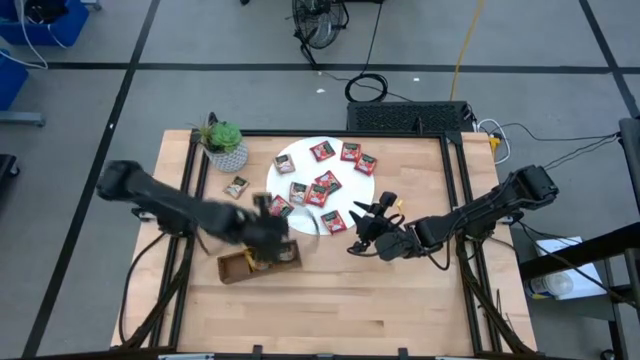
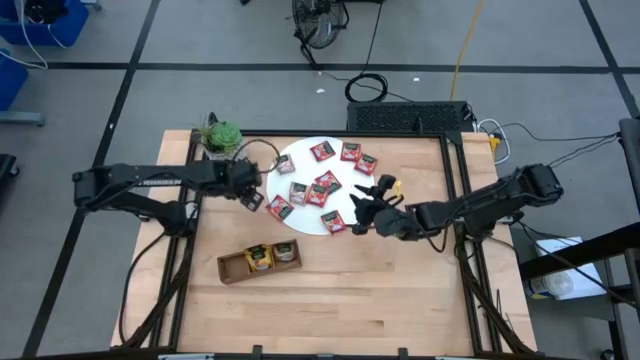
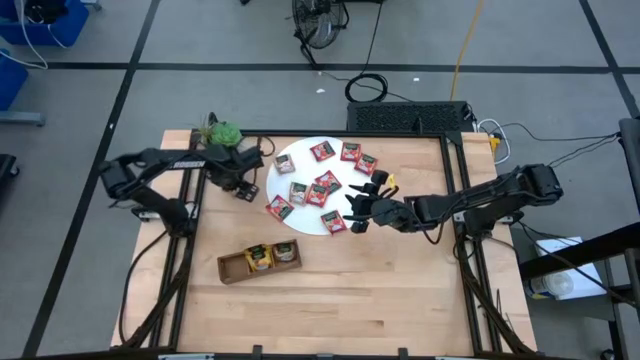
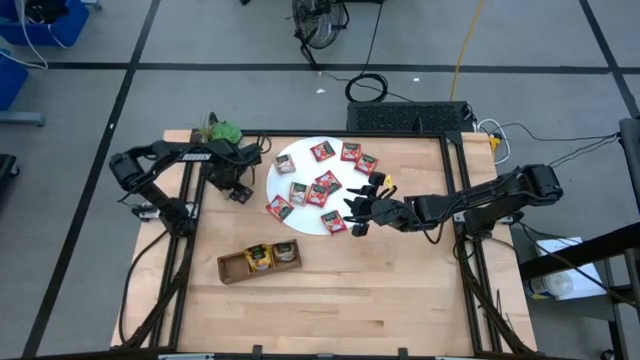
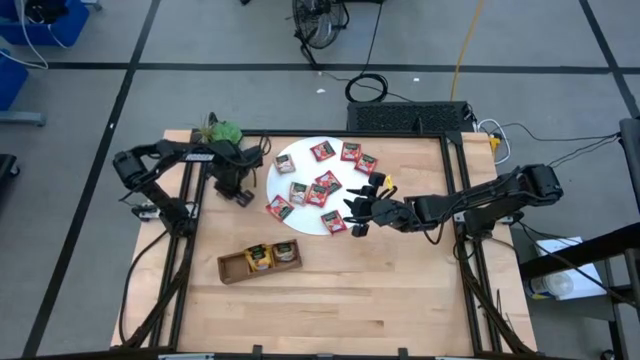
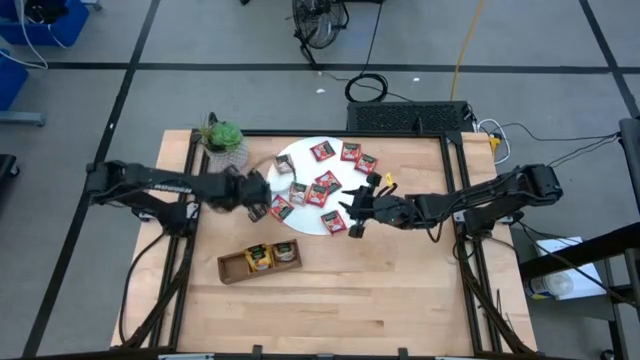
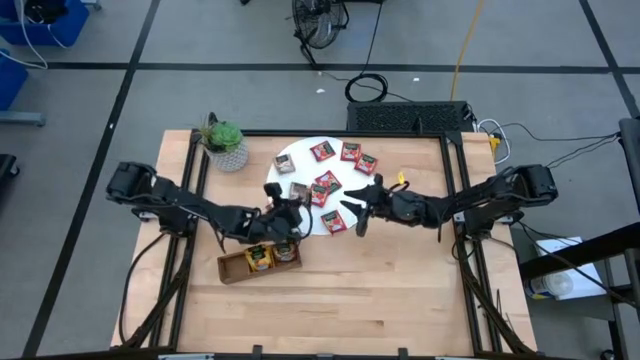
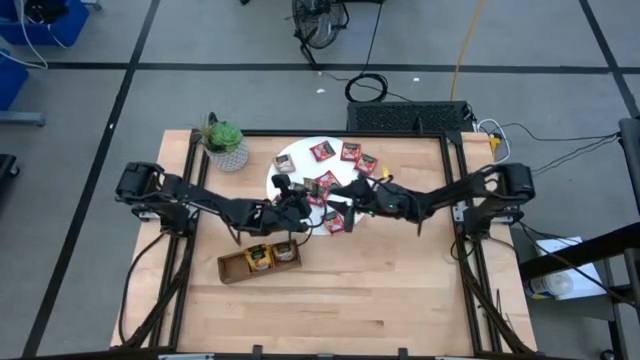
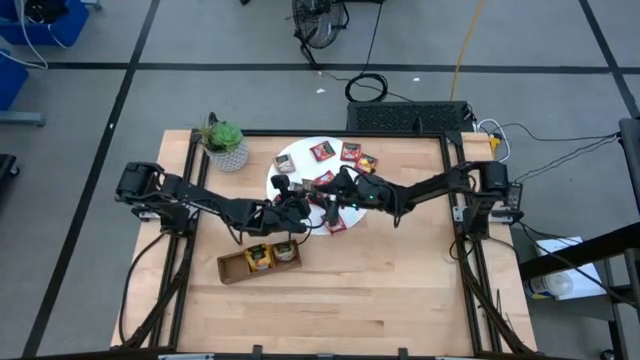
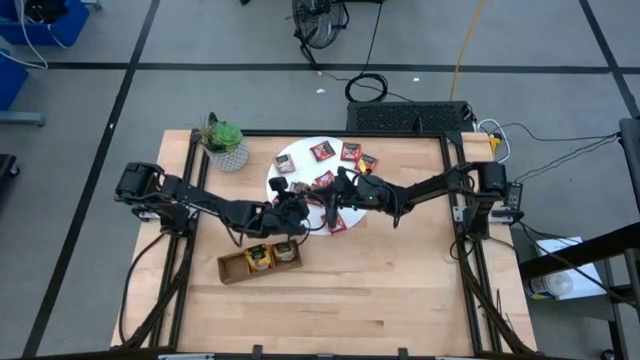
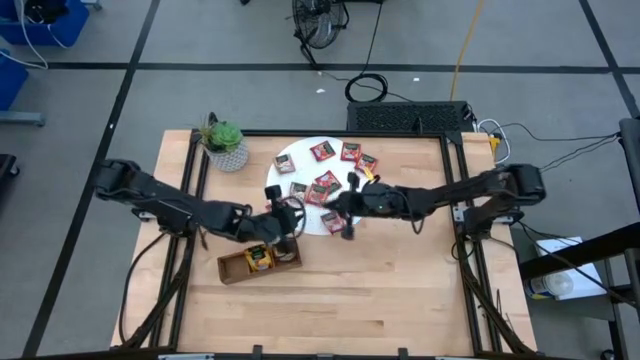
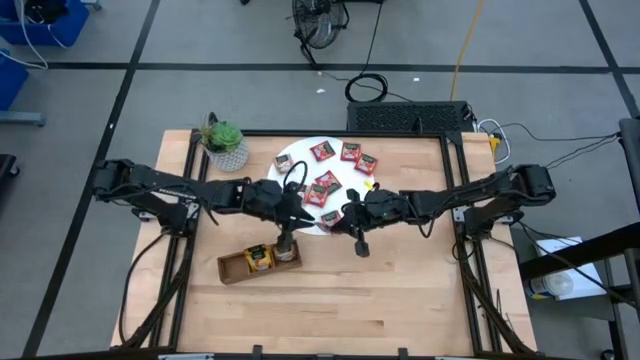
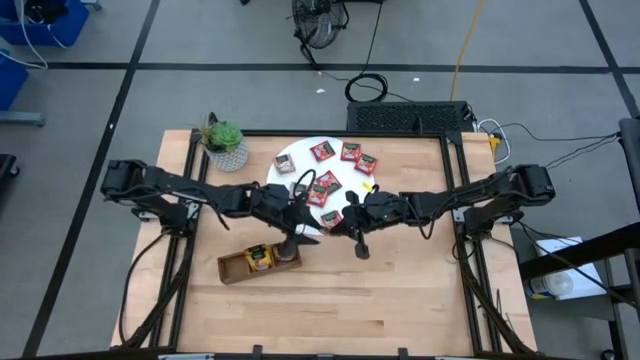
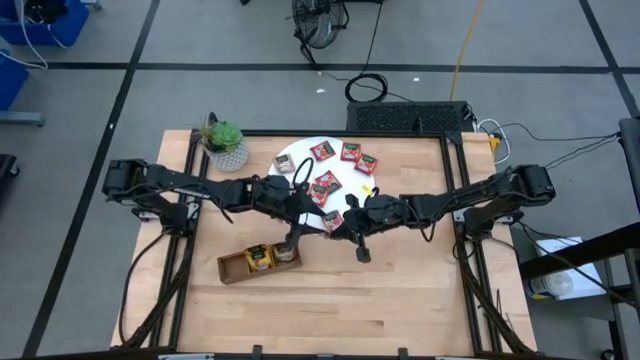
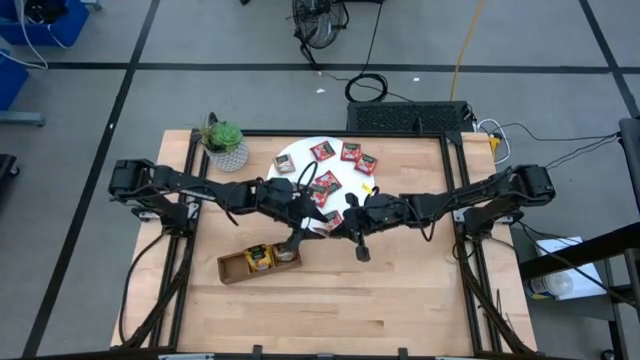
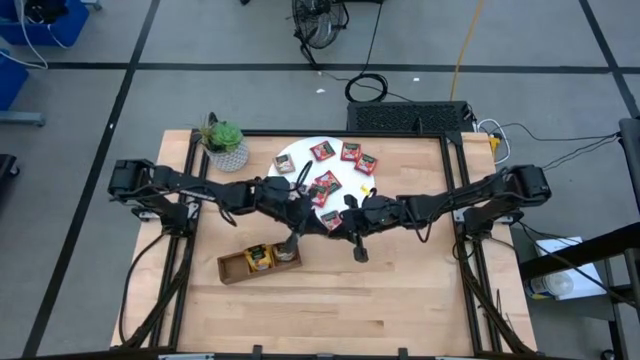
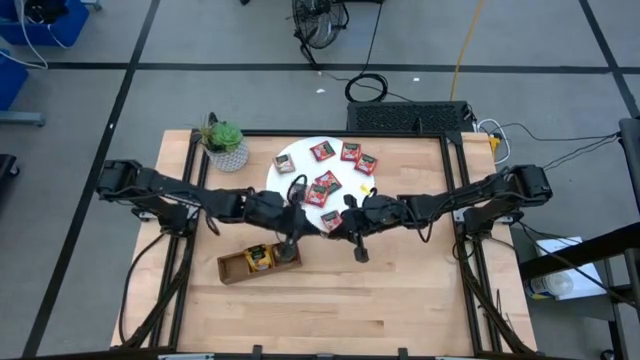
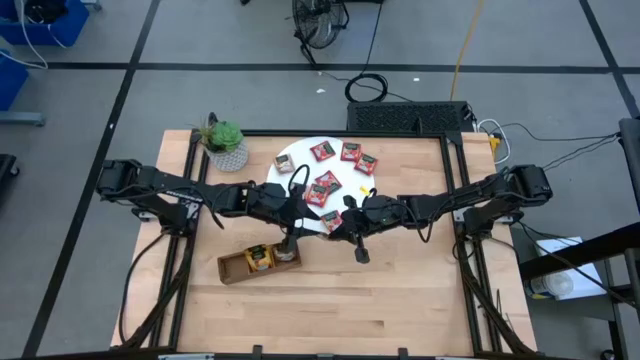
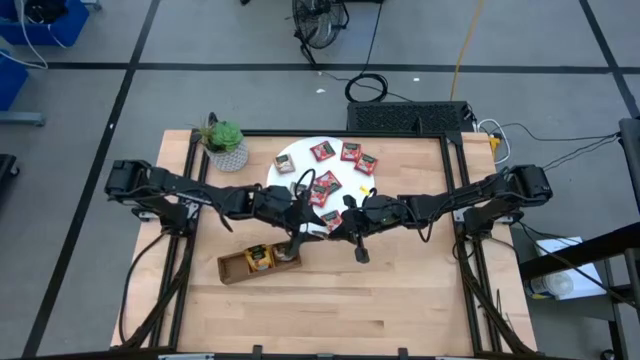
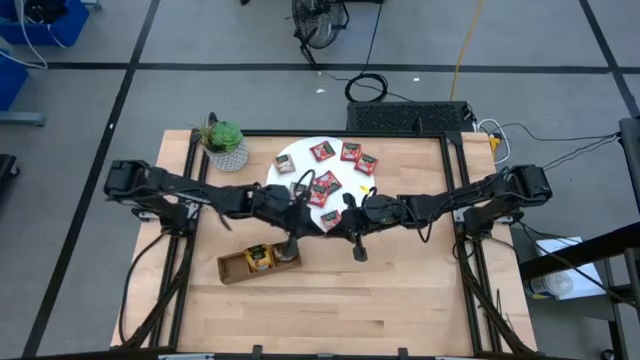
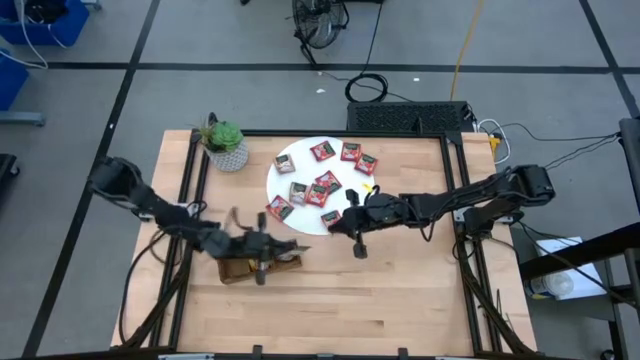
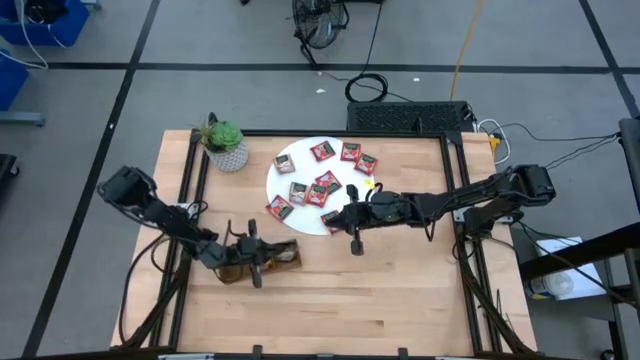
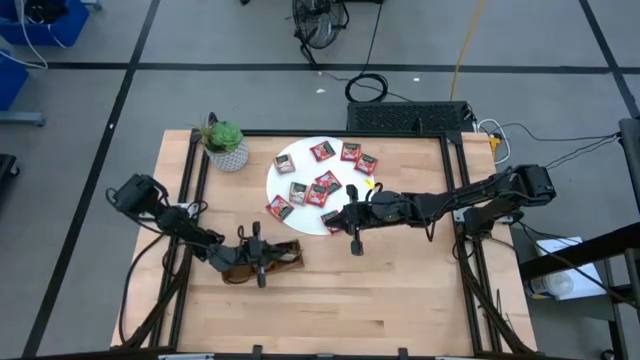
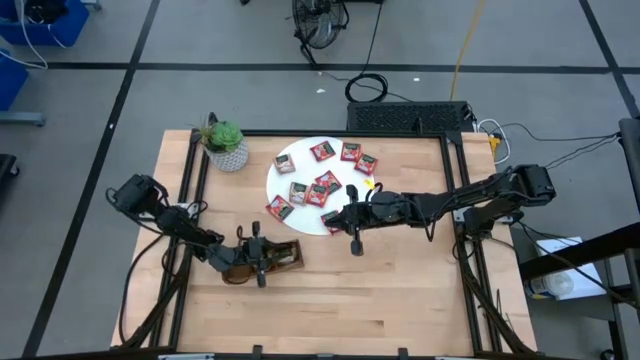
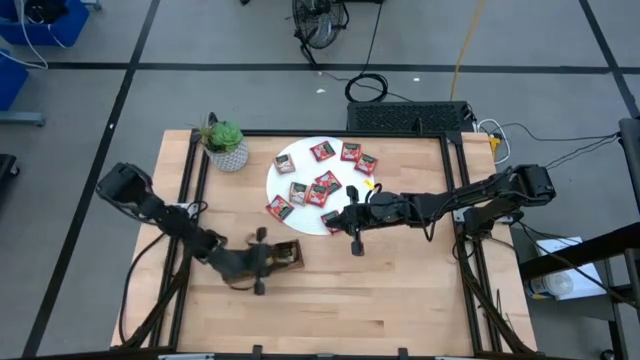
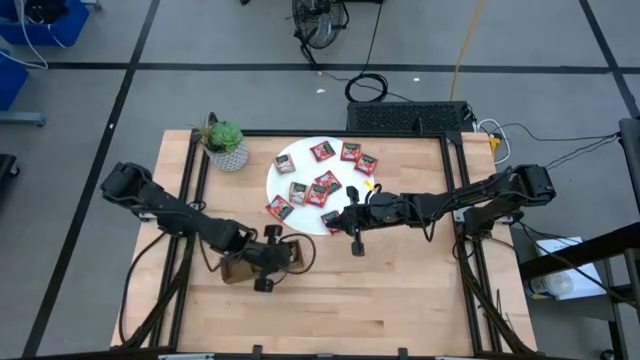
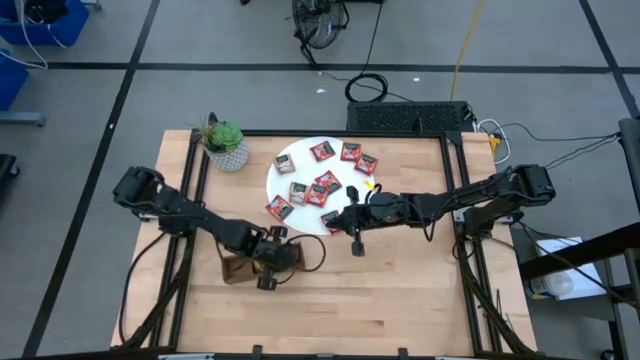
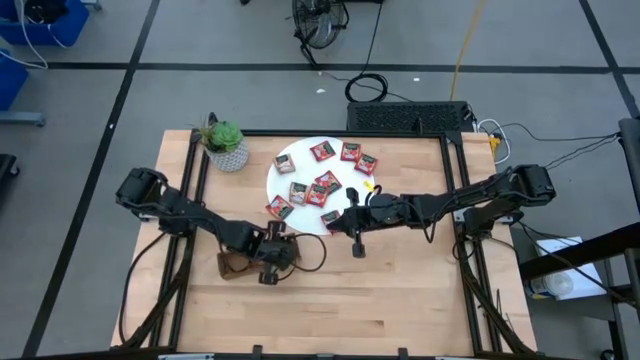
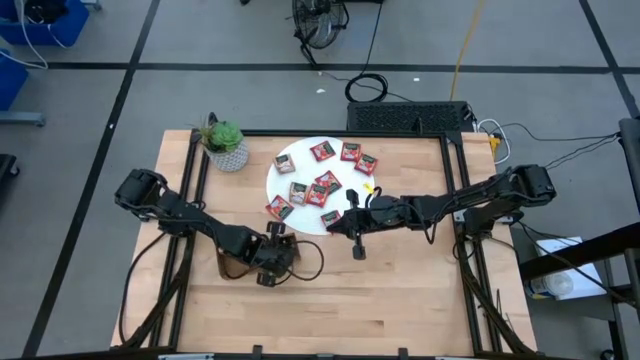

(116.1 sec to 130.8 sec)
Task: Pick & Place Tea
Put the brown tea bag into the right section of the wooden organizer

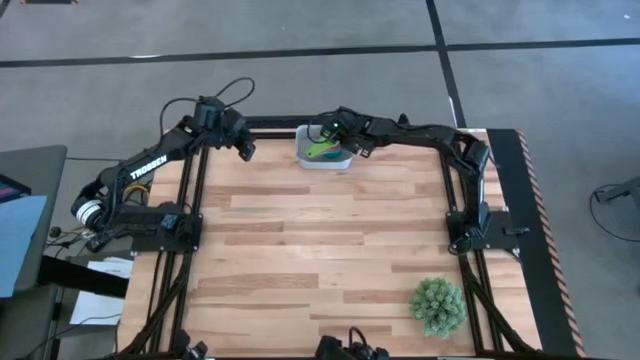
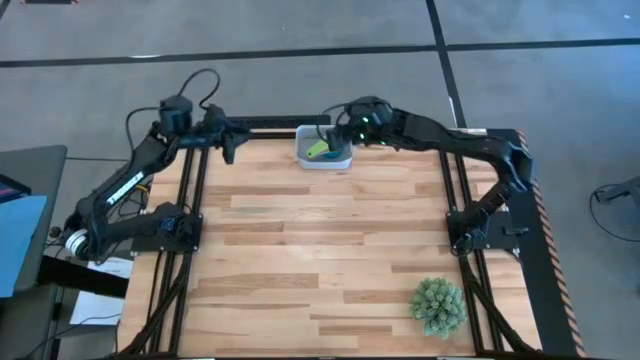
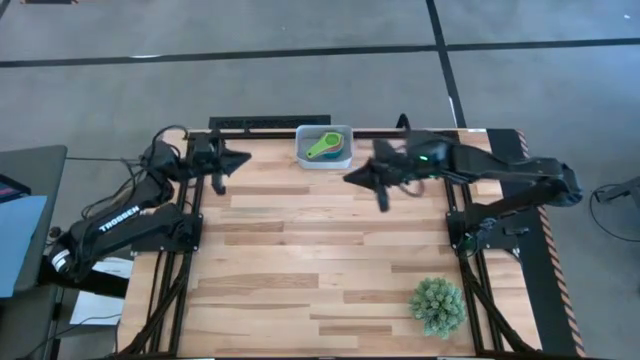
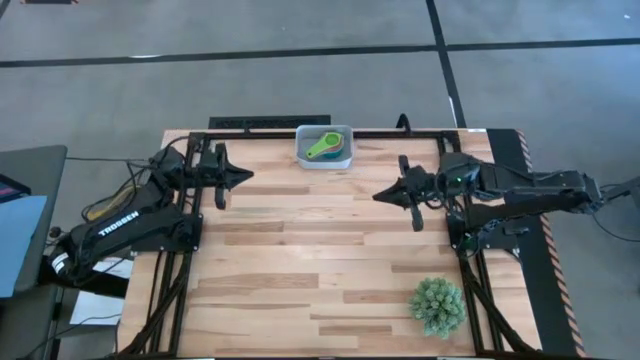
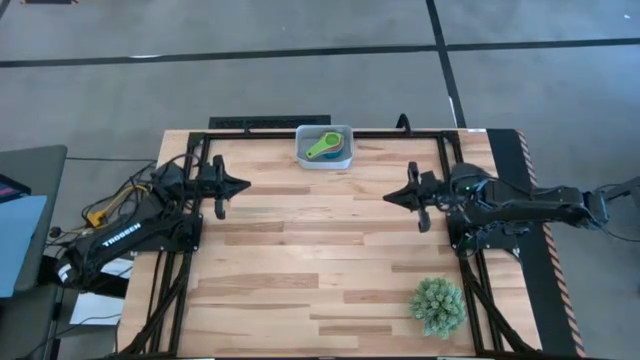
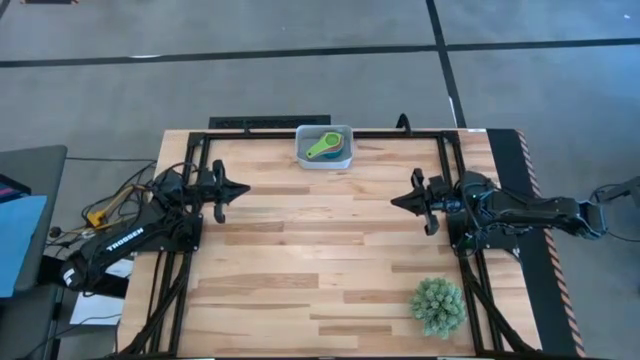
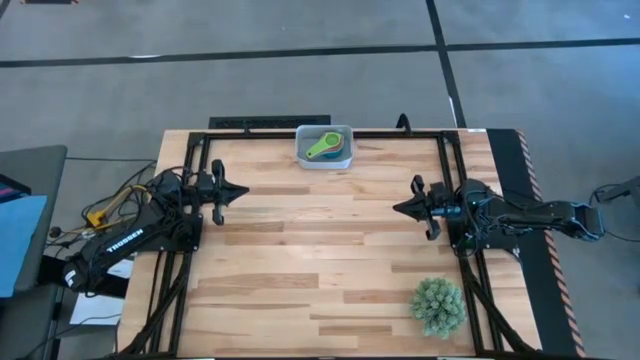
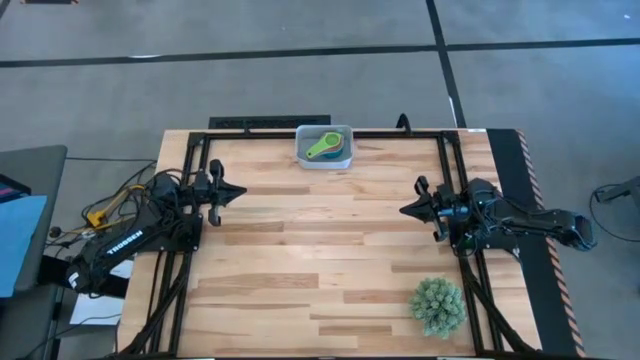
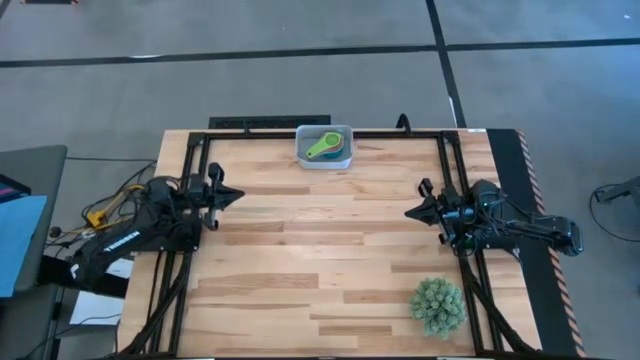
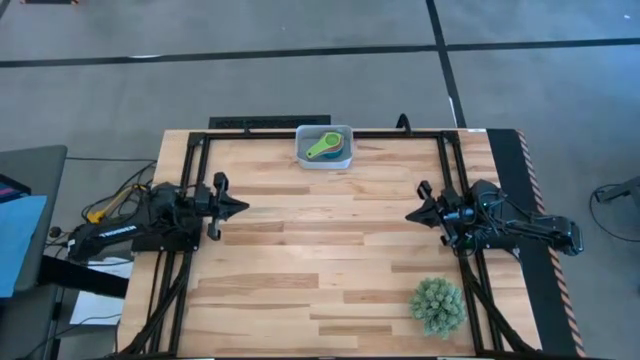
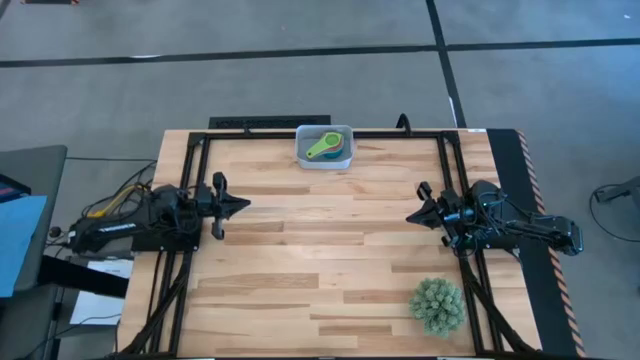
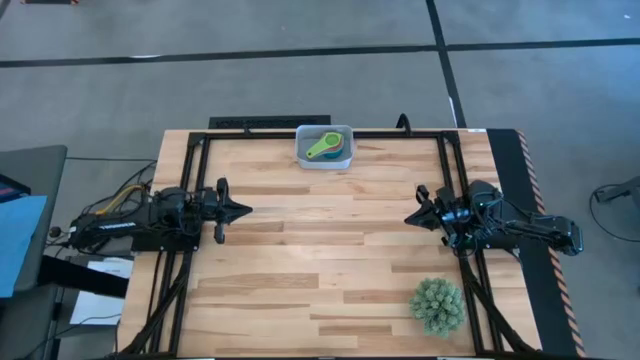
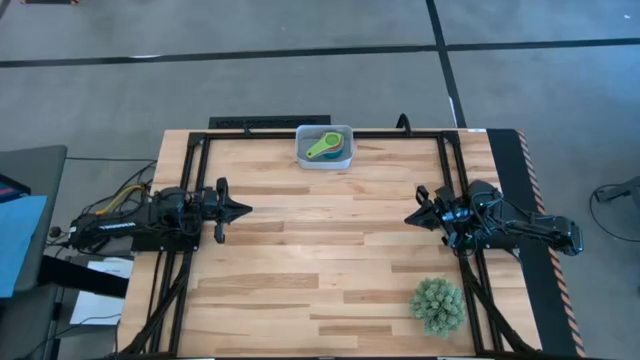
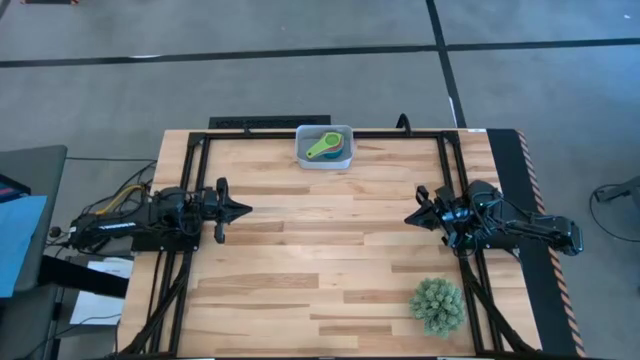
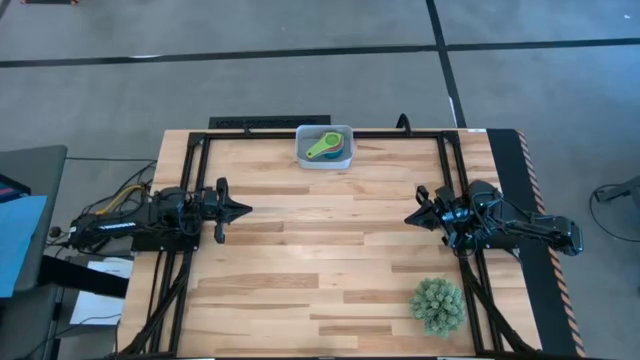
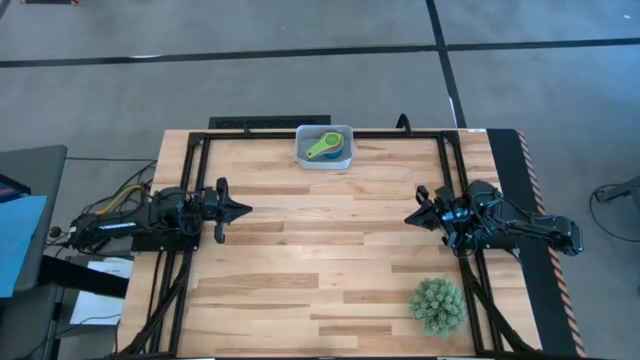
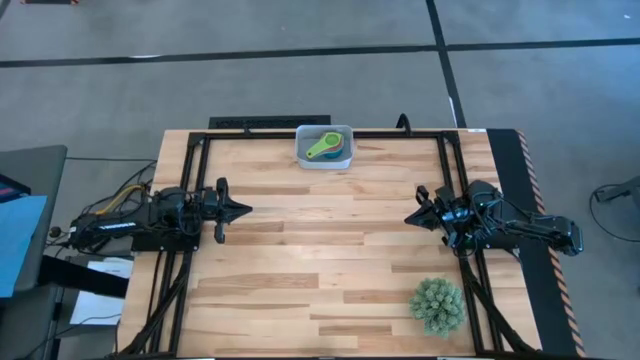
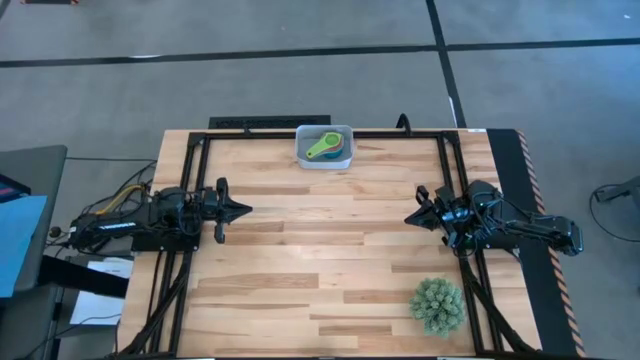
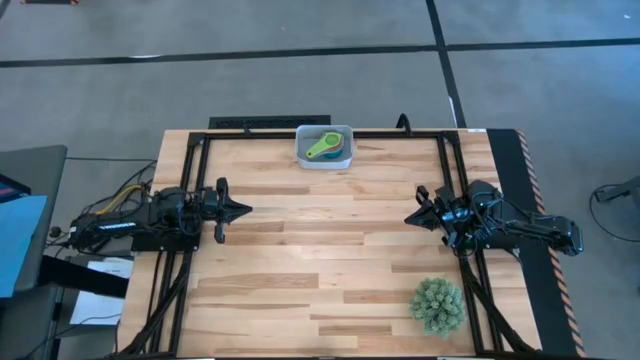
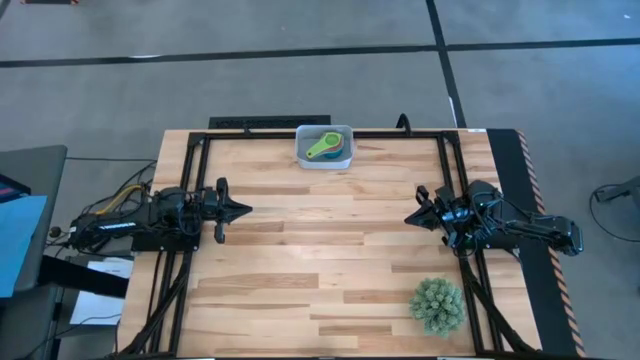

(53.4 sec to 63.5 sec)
Task: Nest measuring cups in basket
Return to Home Position
